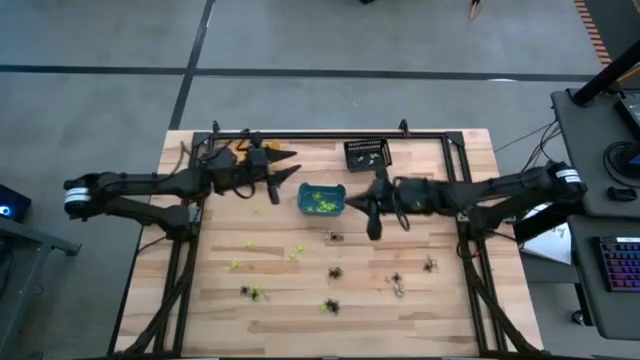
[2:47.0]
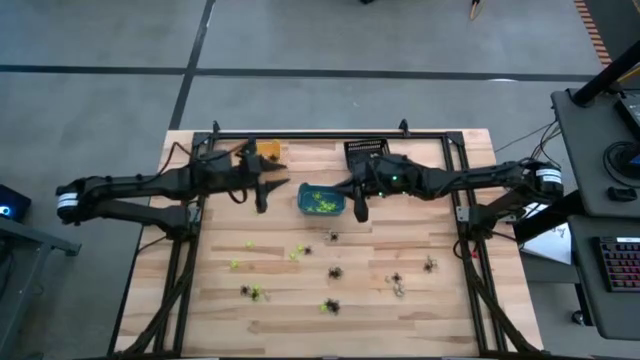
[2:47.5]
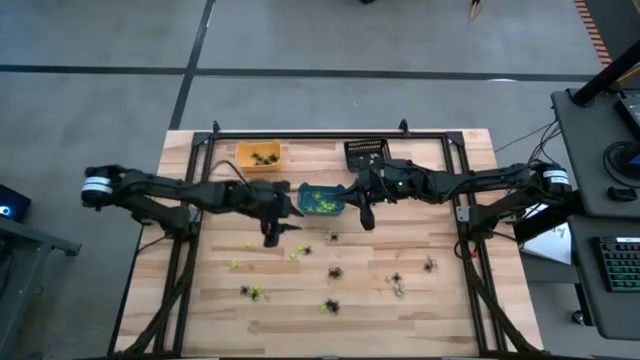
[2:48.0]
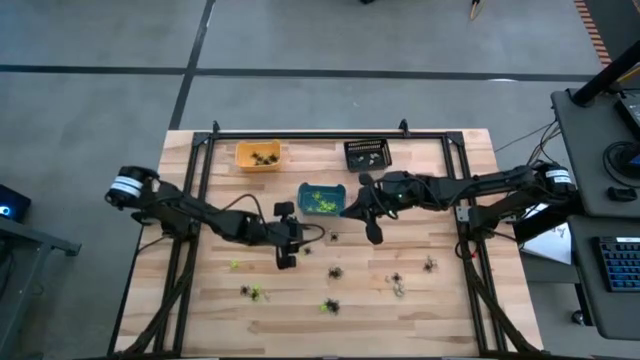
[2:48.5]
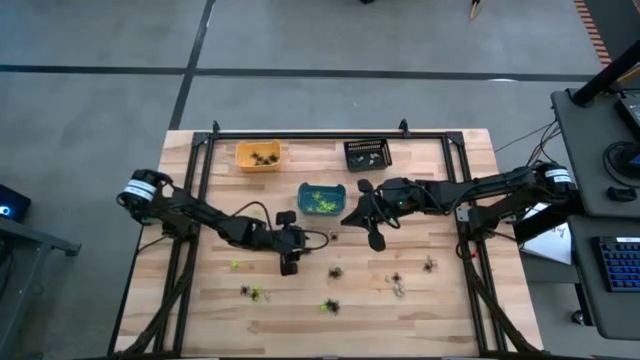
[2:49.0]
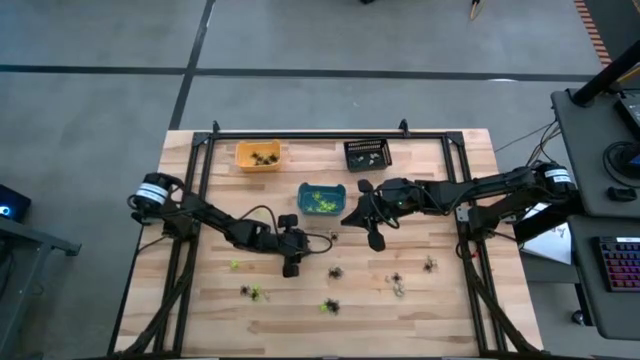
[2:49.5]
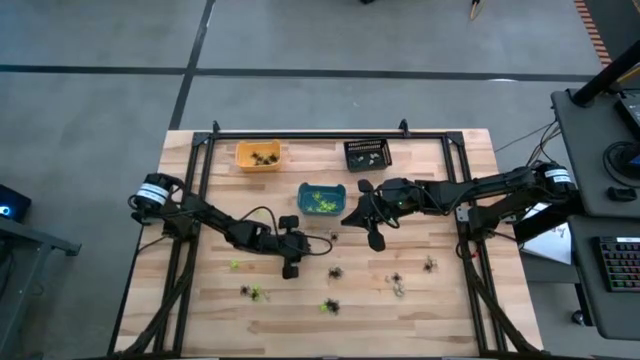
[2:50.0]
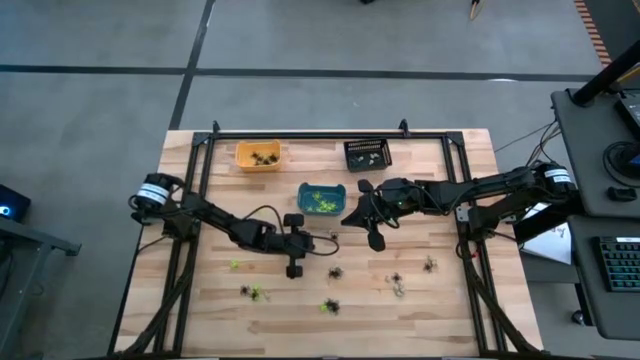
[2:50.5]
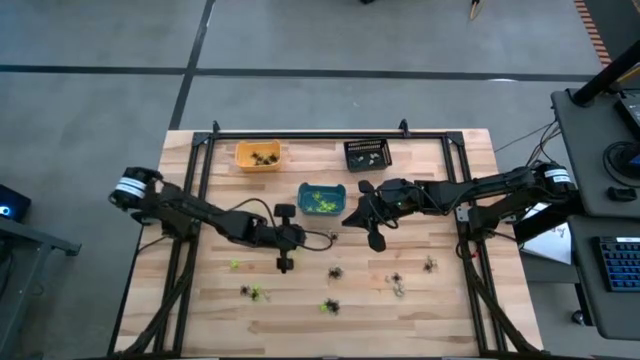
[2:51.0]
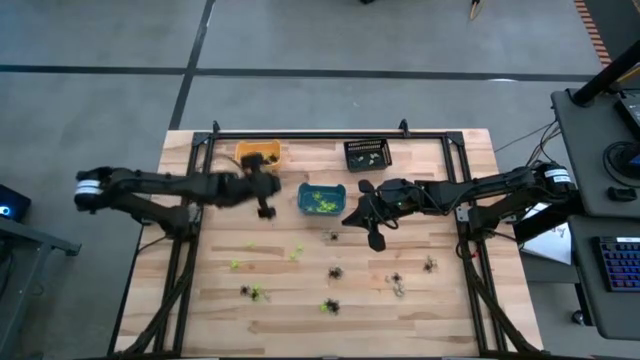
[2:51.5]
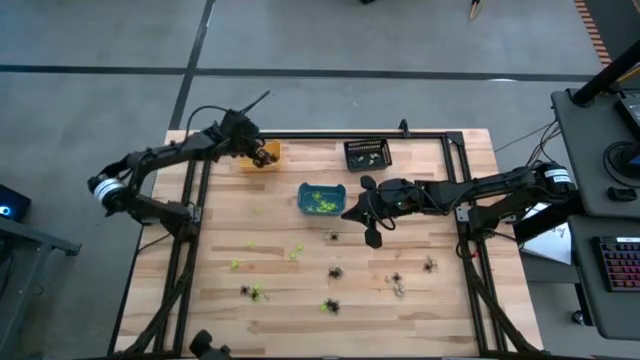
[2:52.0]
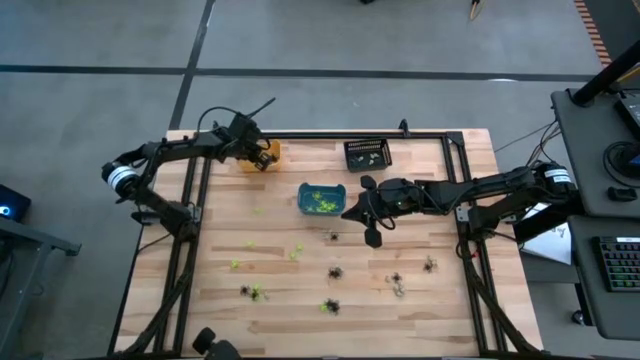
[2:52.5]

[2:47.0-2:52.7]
Task: Sort Halloween decoration
Put the black spider toy into the yellow bin

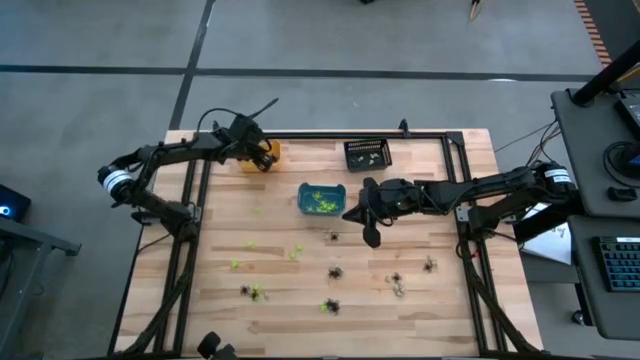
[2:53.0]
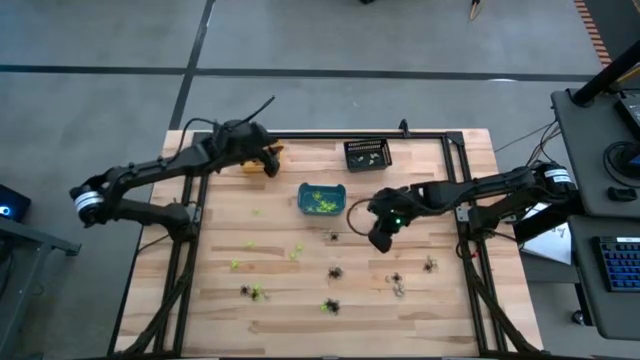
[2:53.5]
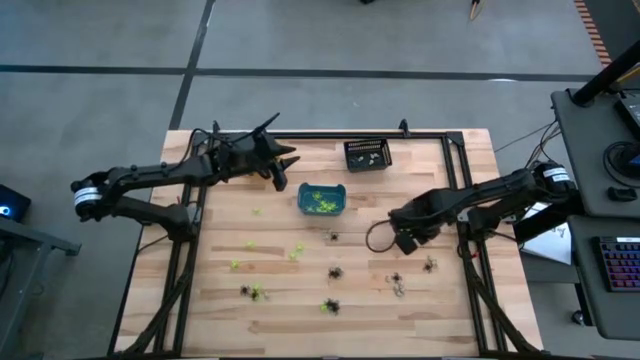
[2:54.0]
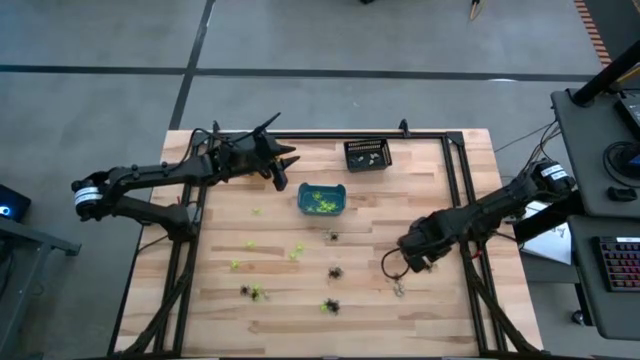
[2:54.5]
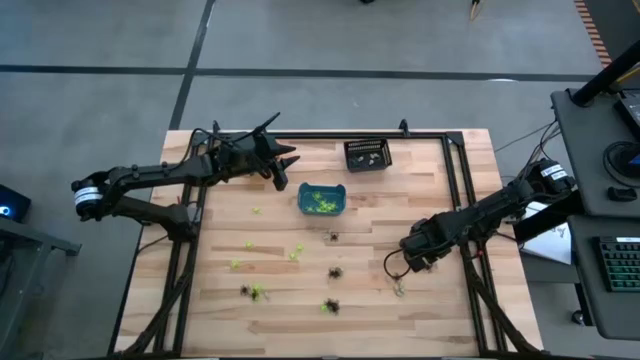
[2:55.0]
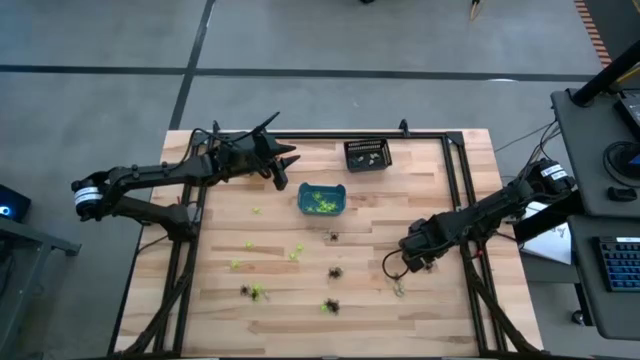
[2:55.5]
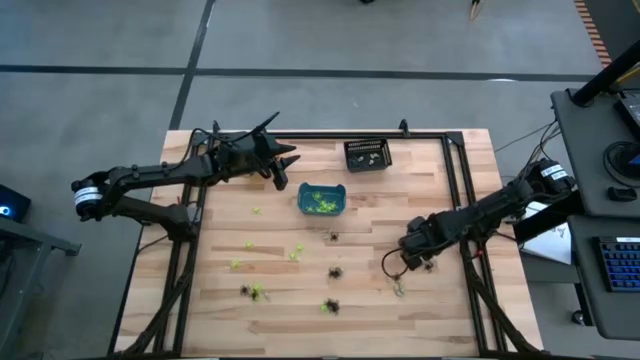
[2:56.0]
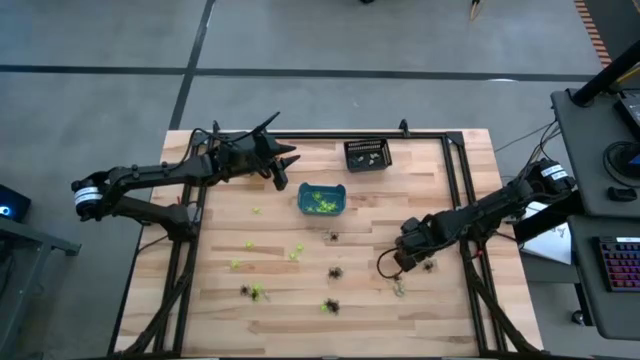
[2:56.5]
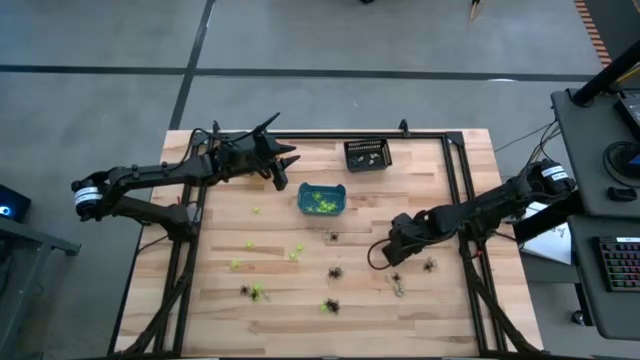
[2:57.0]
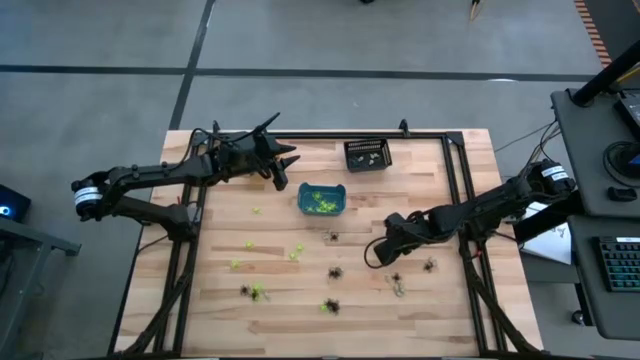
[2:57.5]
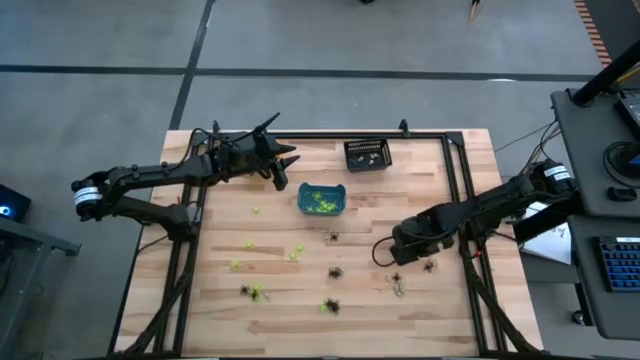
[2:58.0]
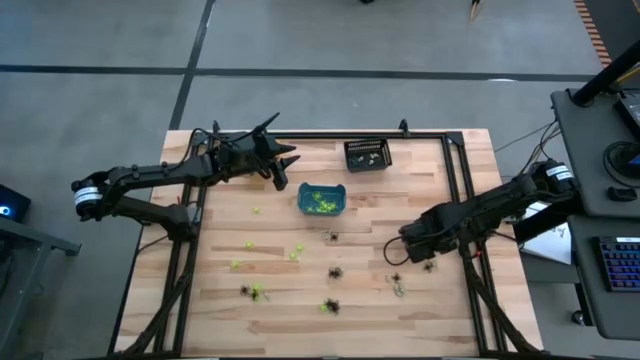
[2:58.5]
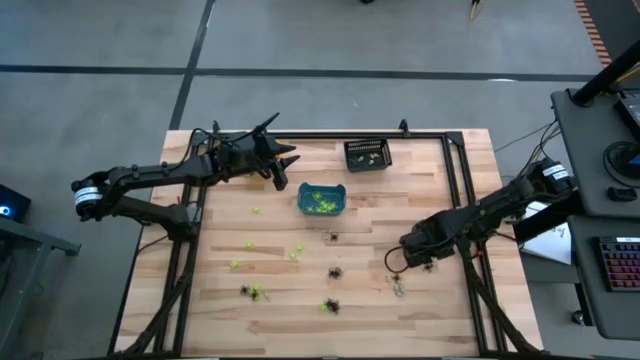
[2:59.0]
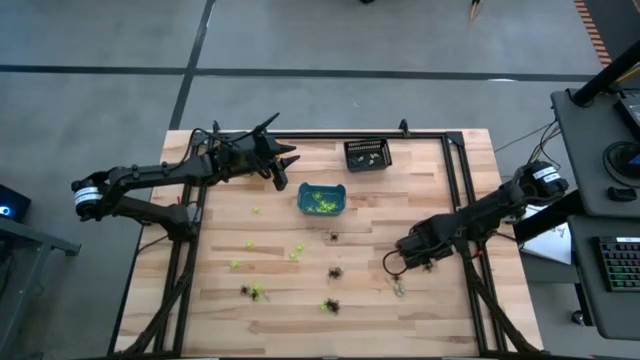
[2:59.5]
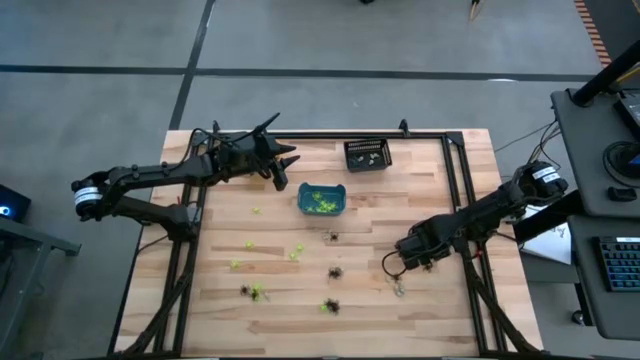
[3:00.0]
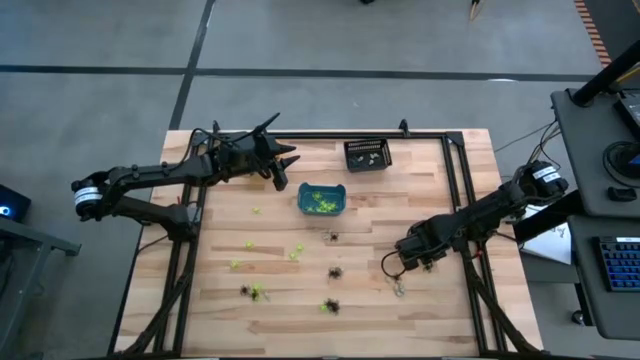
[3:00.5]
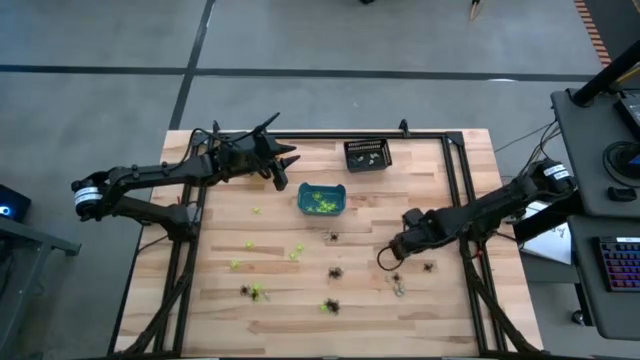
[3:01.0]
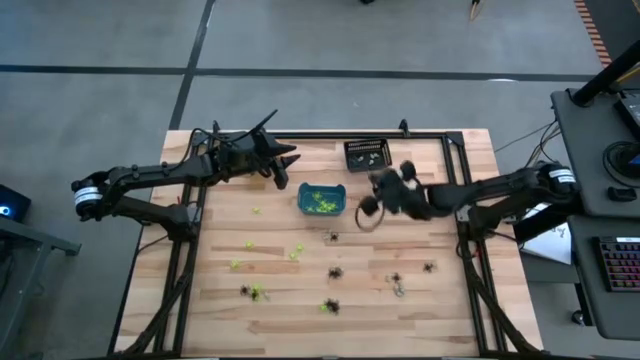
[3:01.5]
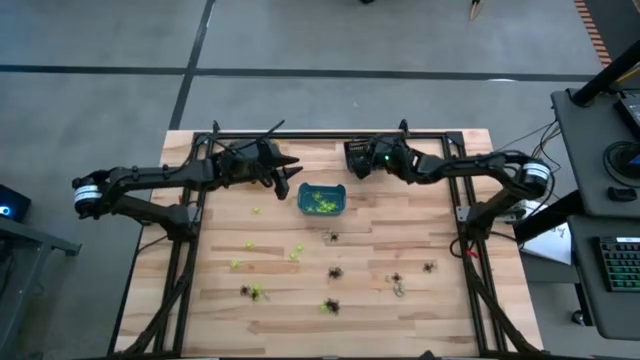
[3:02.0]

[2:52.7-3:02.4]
Put the white skull toy into the black bin

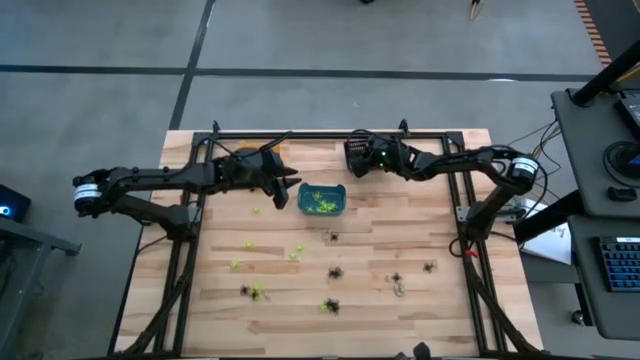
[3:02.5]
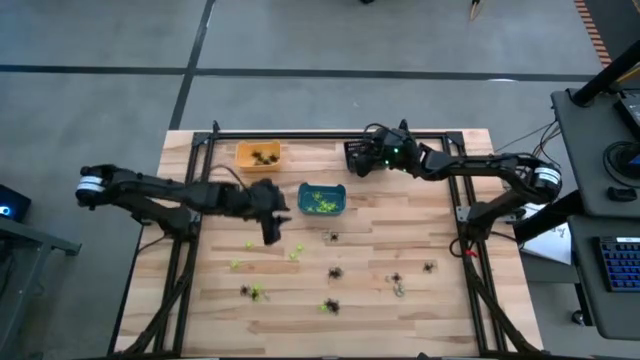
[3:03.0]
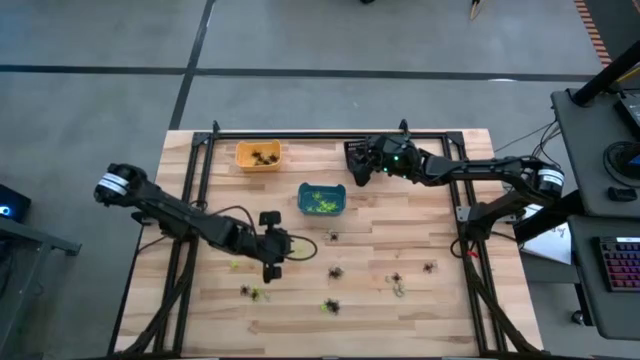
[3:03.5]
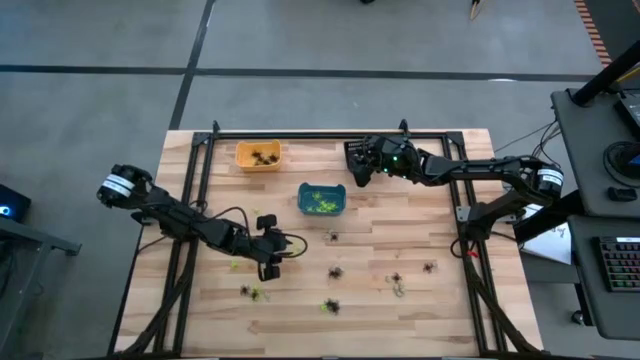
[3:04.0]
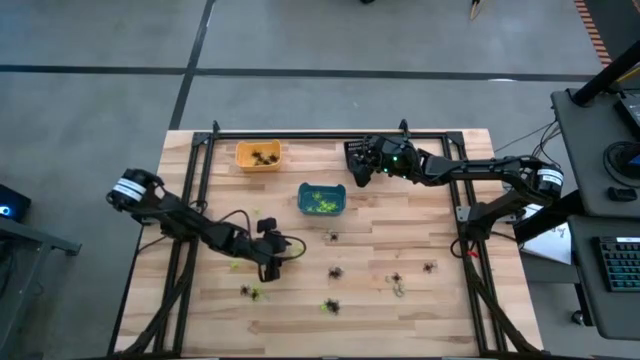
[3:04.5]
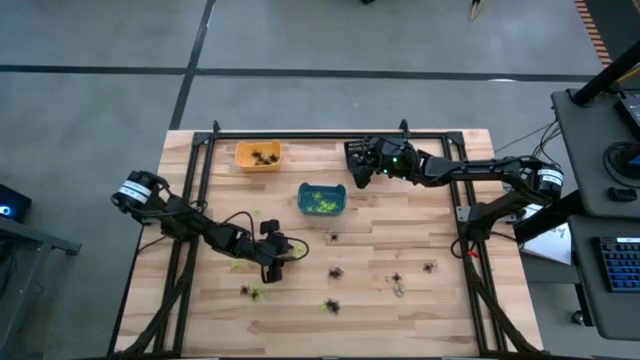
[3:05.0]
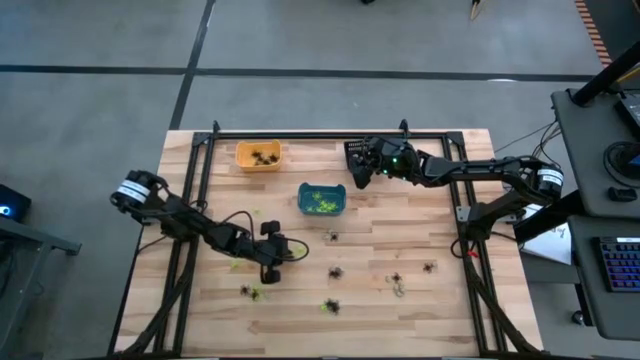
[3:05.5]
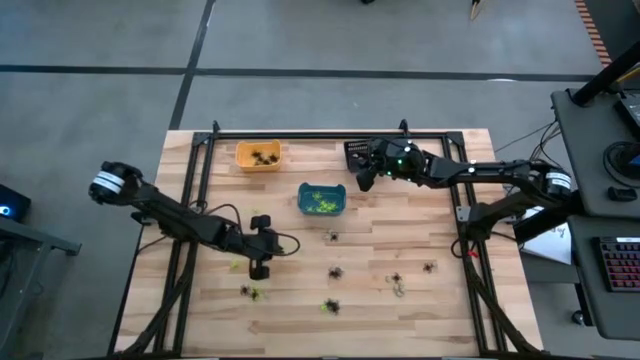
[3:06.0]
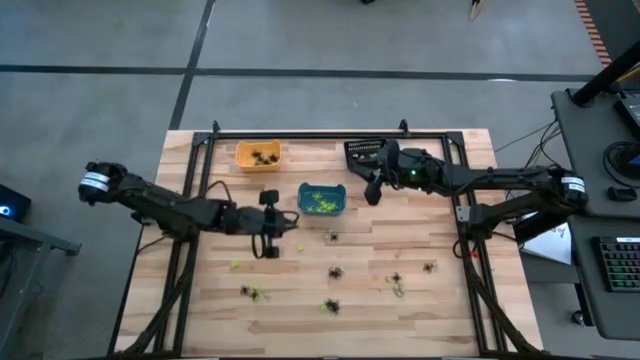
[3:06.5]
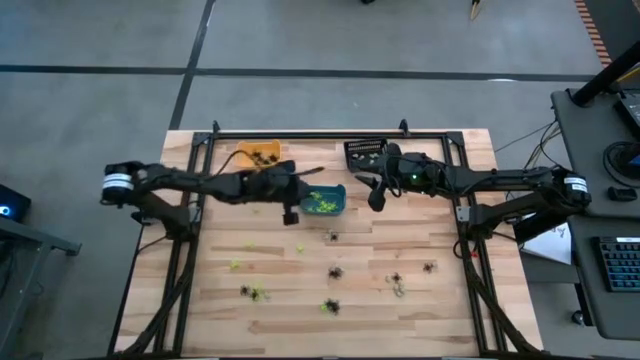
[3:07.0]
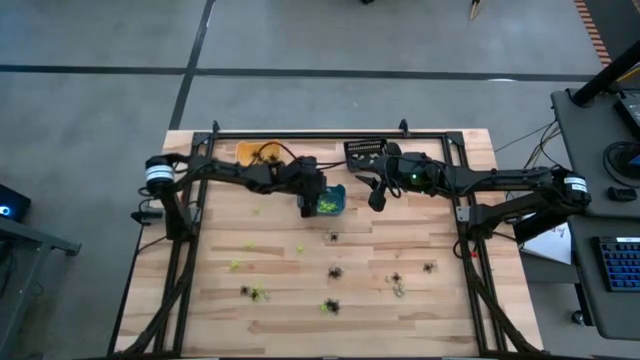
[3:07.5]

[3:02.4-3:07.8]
Put the green spider toy into the blue bin
